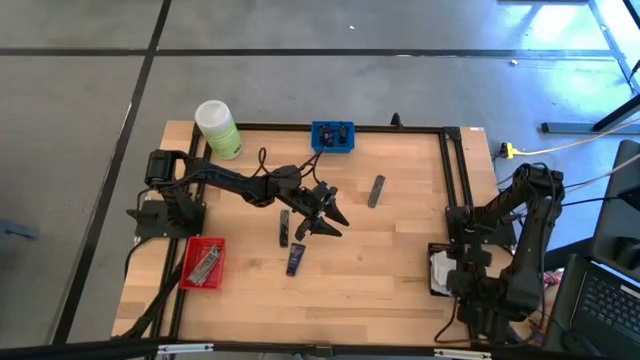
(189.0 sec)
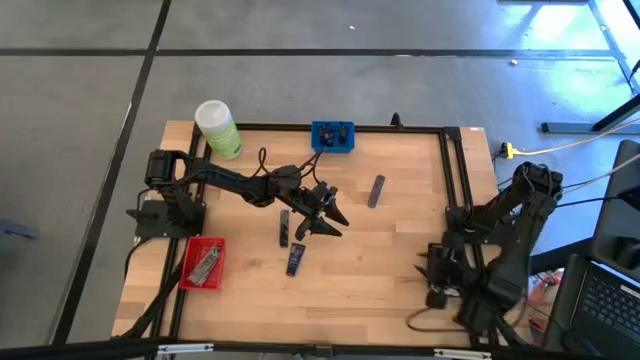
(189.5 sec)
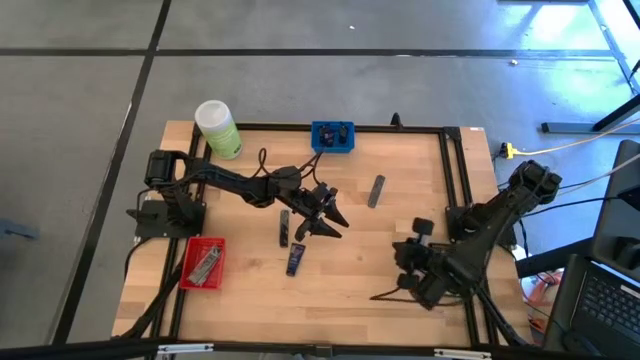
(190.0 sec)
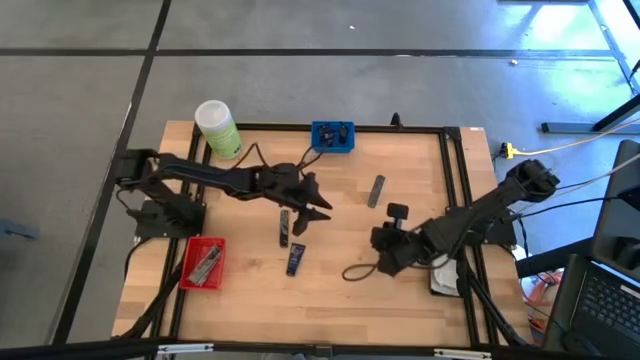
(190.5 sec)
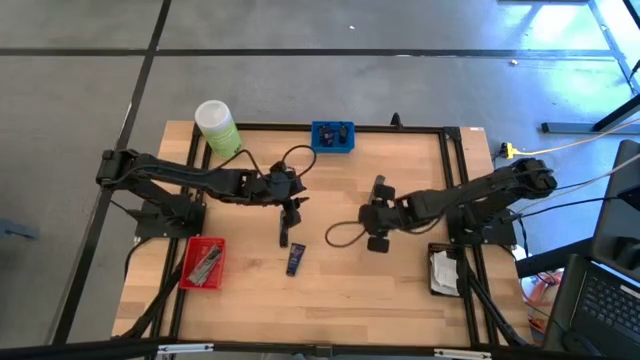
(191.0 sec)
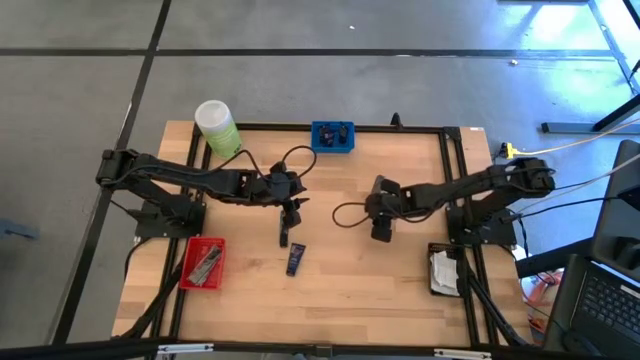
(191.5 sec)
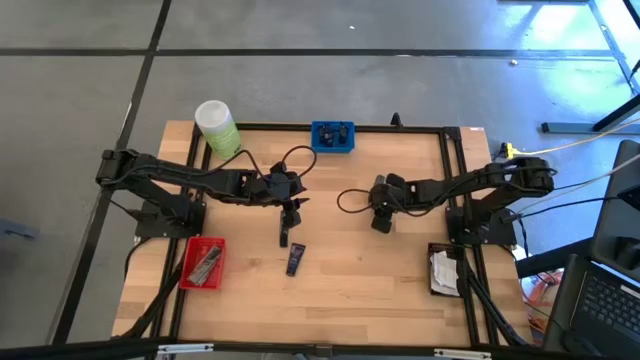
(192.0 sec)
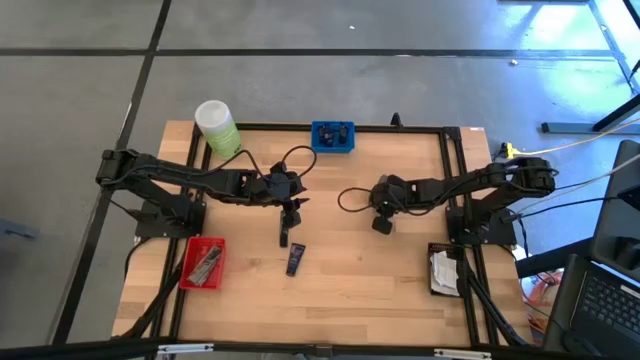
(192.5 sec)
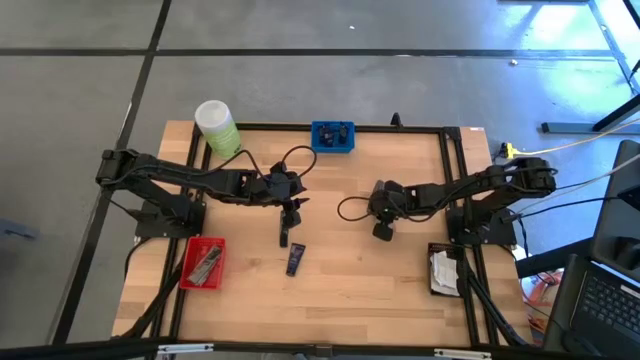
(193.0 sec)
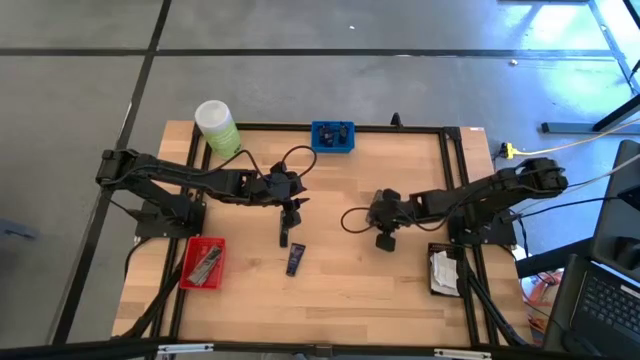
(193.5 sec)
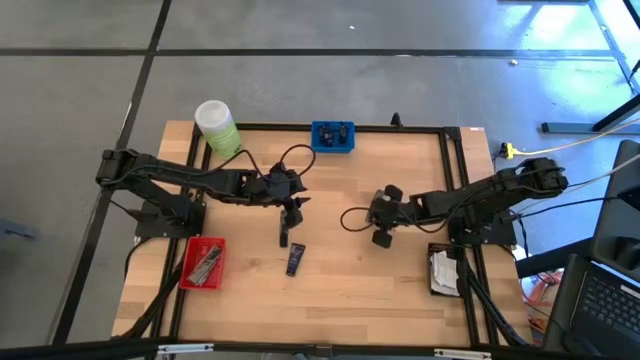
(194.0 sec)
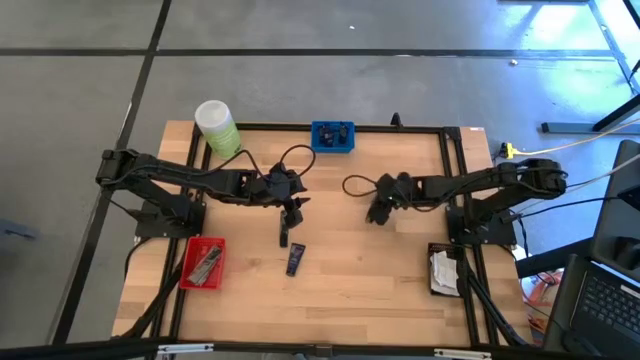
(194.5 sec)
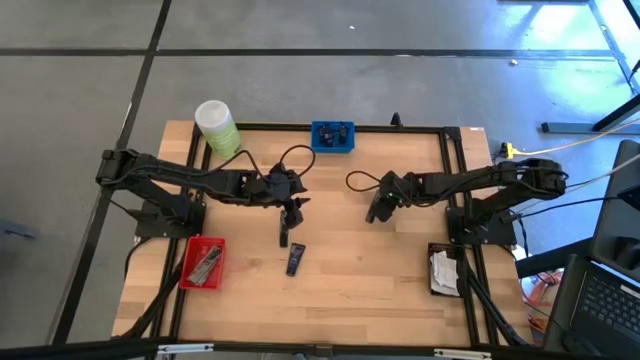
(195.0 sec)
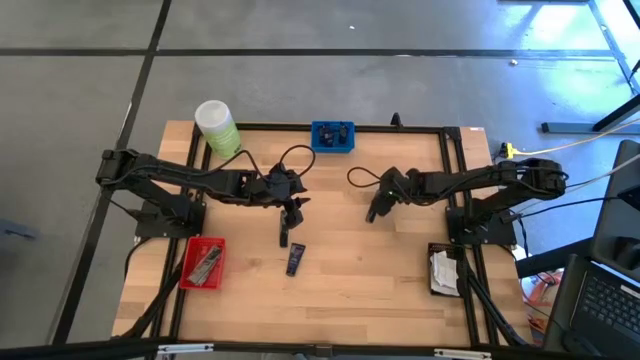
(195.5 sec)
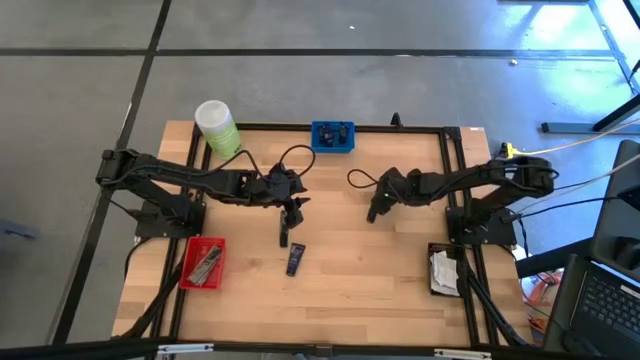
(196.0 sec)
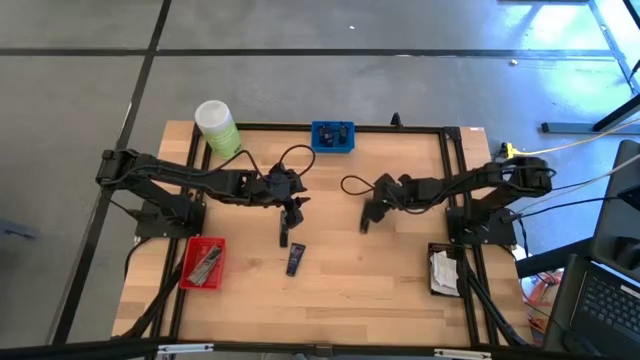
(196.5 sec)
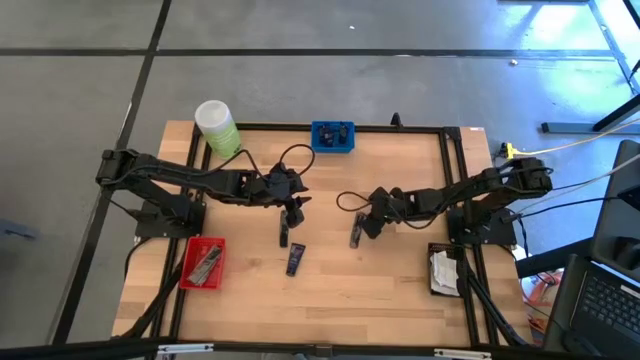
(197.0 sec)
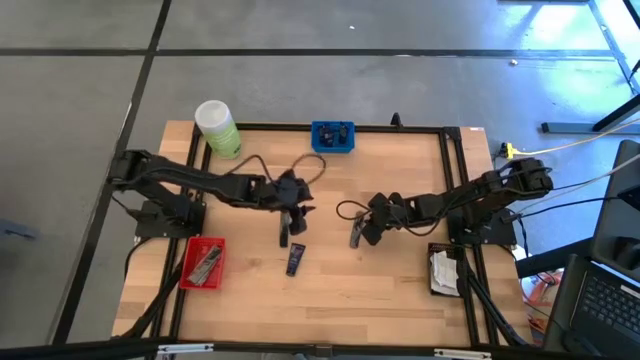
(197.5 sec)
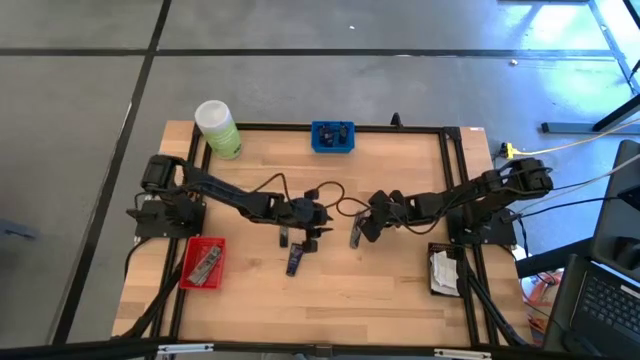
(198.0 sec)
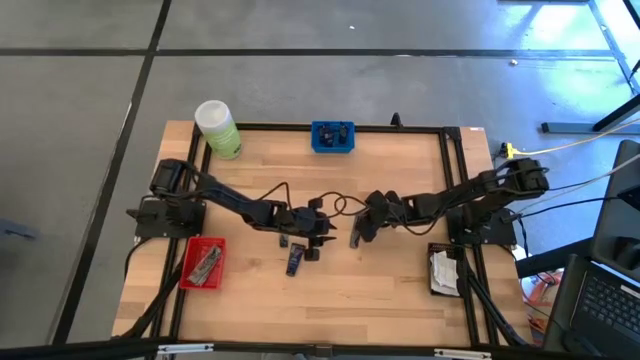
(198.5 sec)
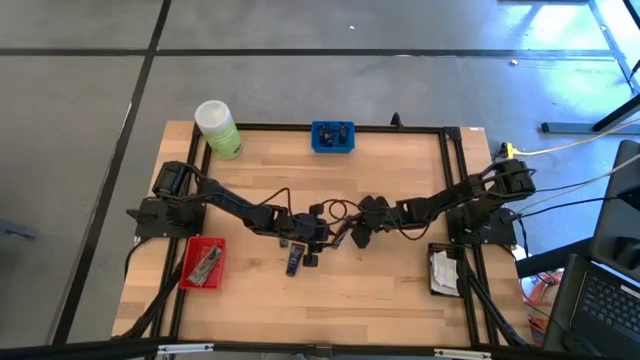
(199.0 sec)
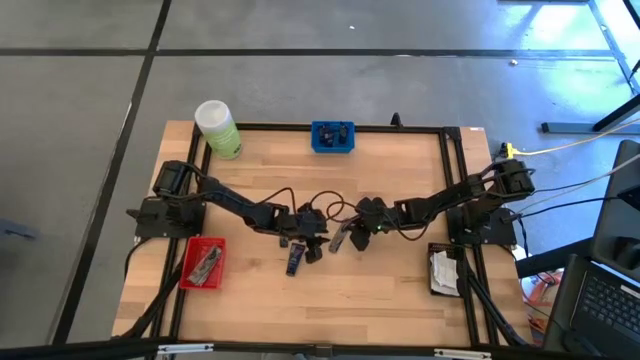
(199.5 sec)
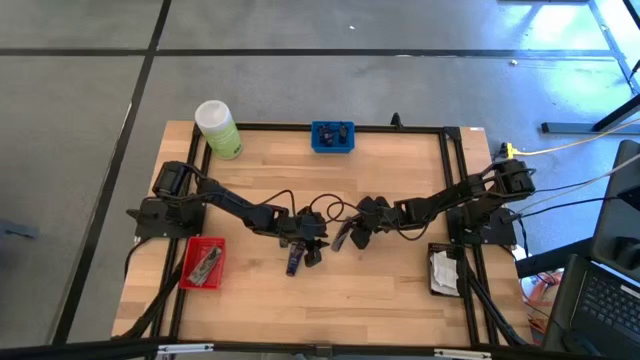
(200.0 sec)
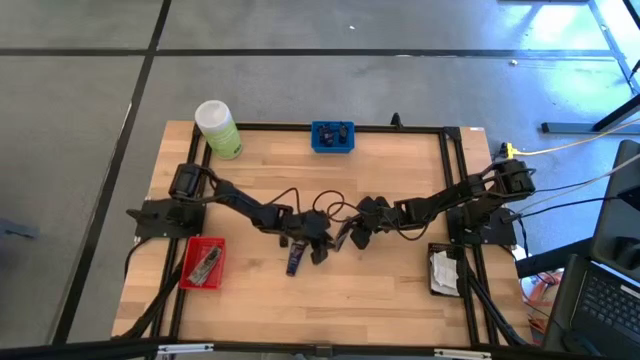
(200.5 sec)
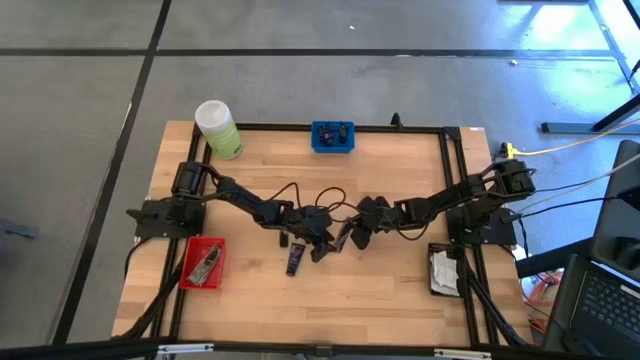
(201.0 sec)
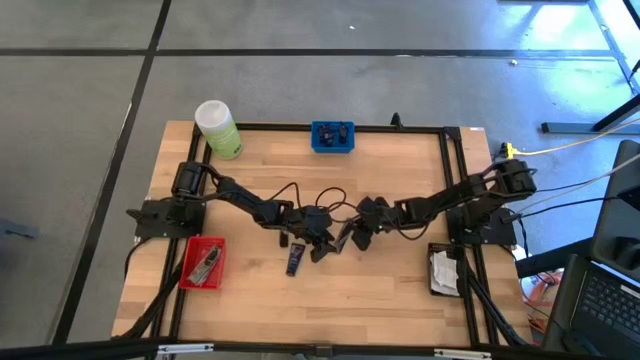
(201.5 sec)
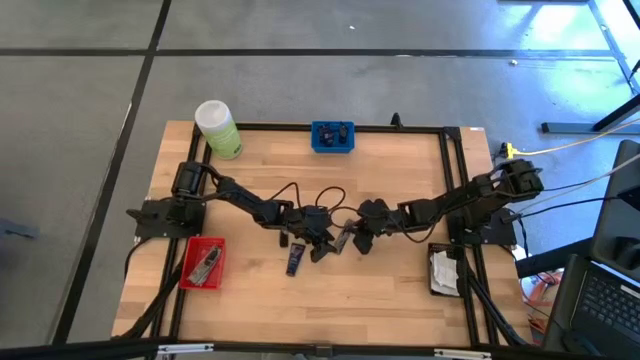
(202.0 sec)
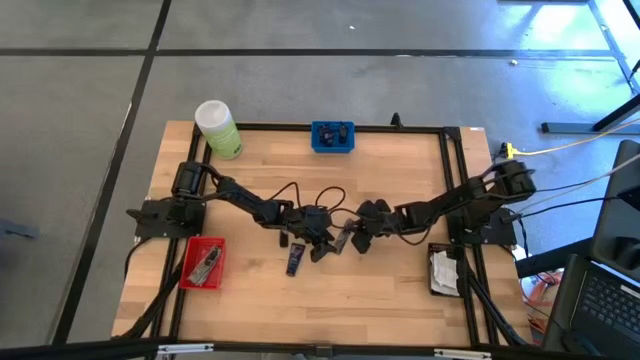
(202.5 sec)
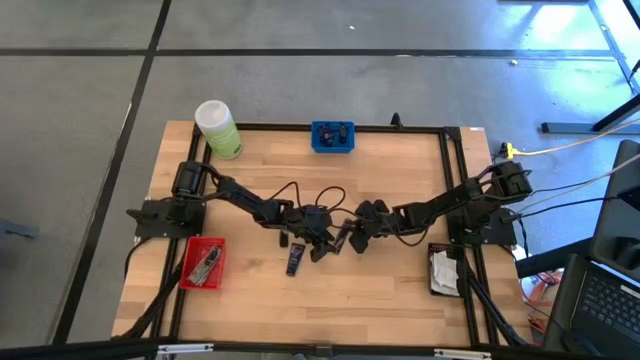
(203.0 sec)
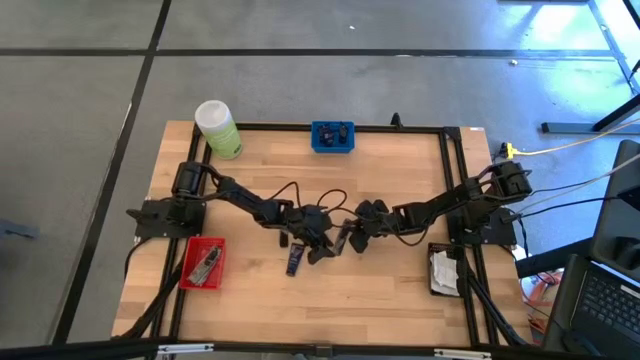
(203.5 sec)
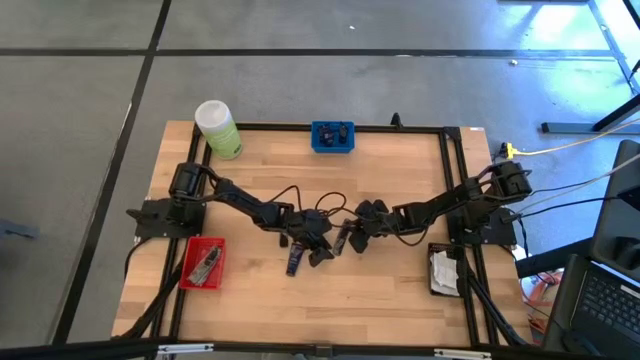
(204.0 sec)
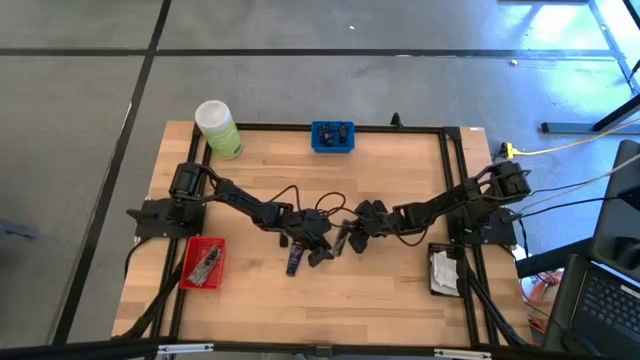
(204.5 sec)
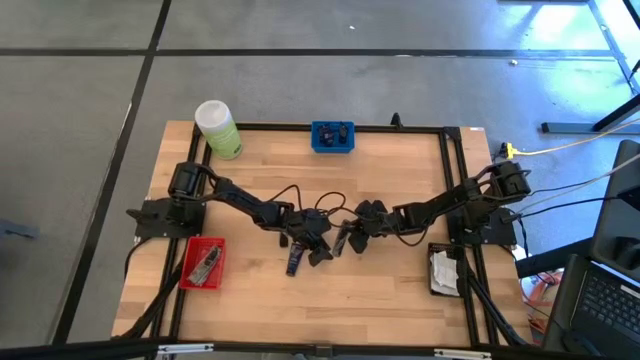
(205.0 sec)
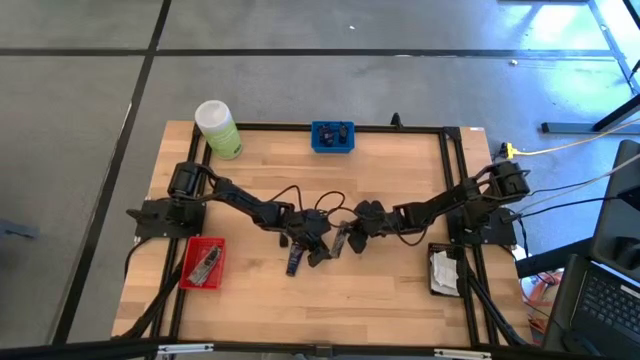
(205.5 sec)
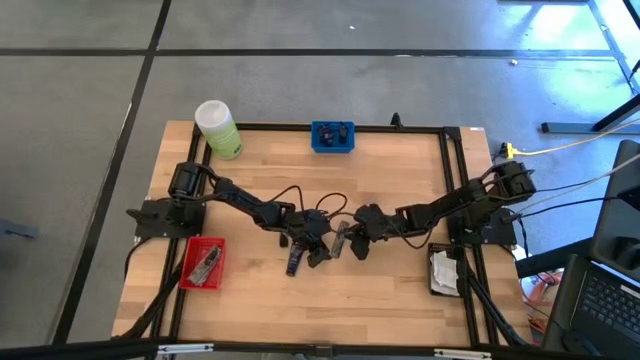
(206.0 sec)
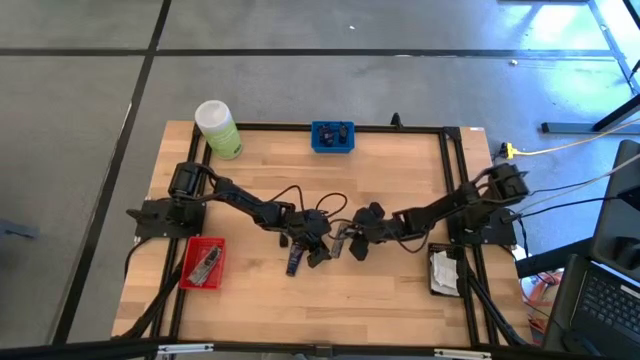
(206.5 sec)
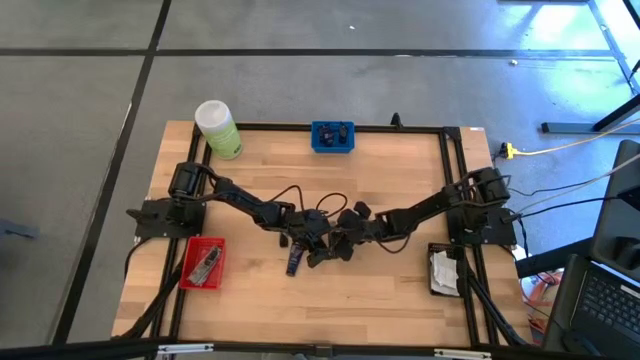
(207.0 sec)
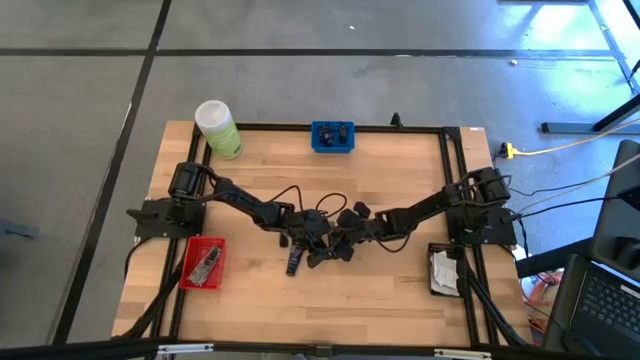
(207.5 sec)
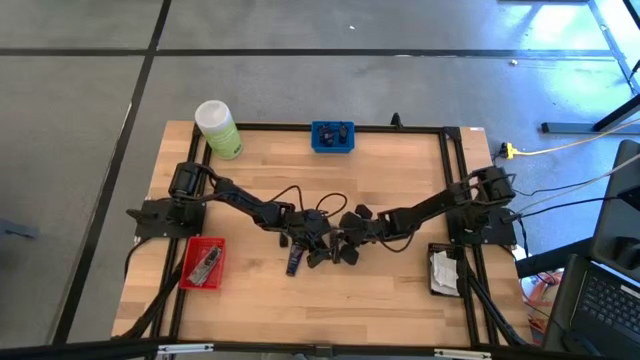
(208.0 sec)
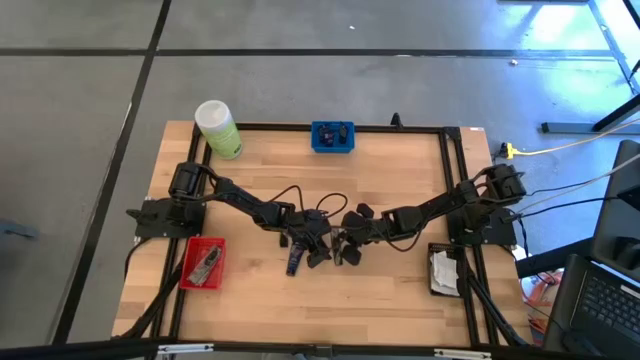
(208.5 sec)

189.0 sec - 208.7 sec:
Task: Pick & Place Travel size toiletries
Put the black hair comb into the red basket
